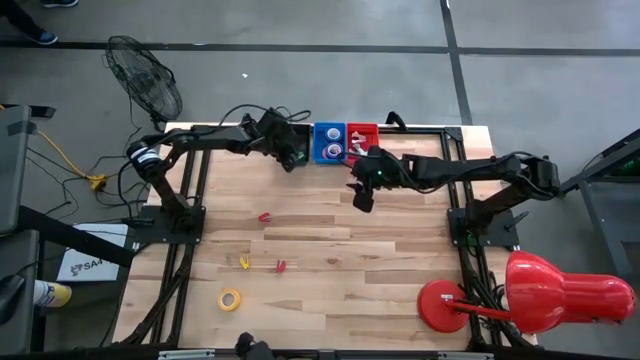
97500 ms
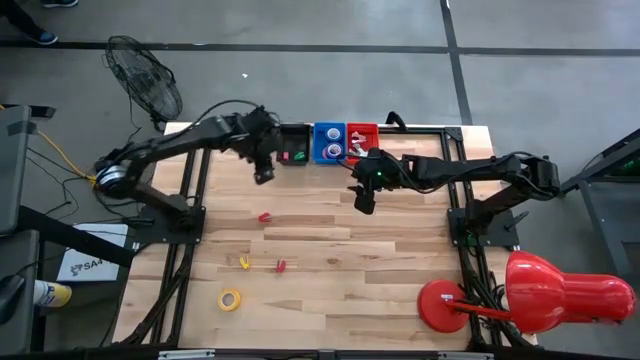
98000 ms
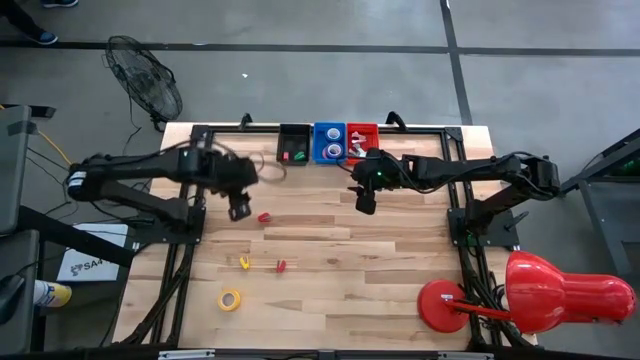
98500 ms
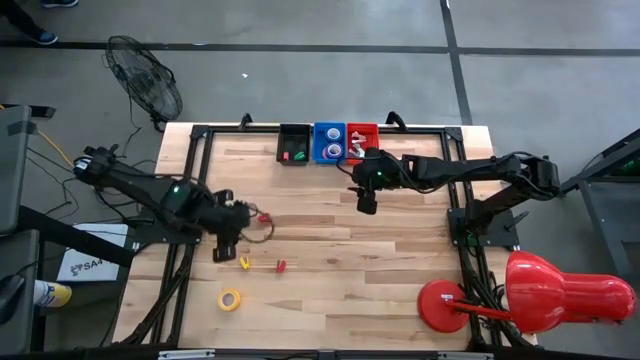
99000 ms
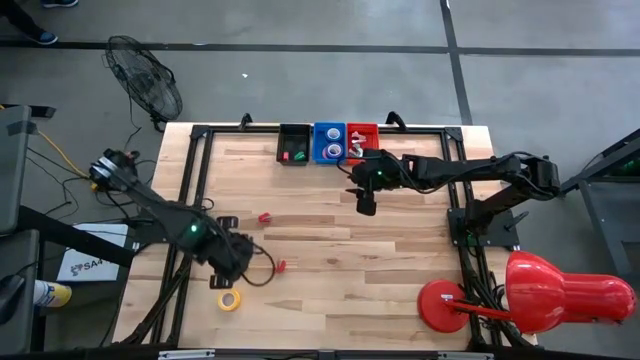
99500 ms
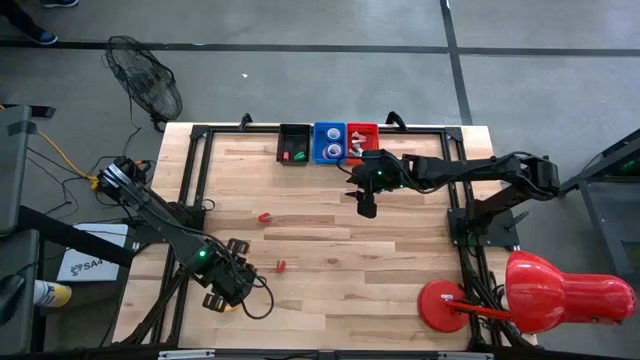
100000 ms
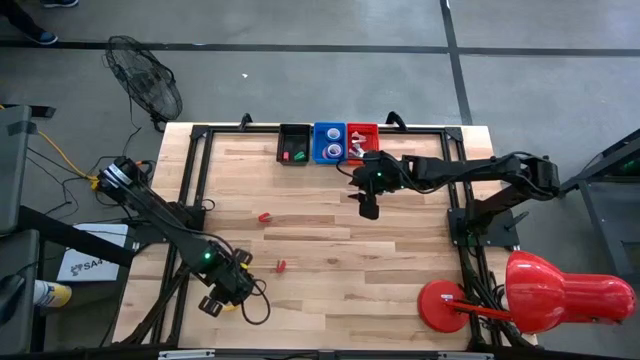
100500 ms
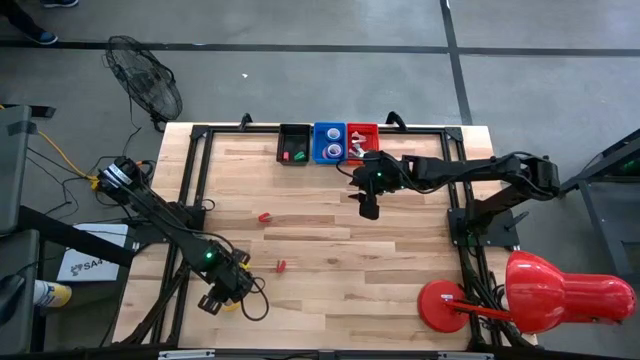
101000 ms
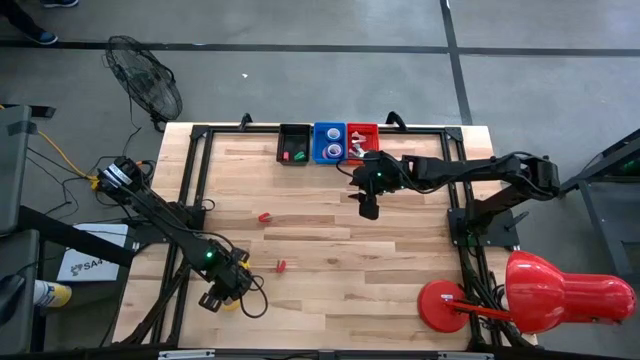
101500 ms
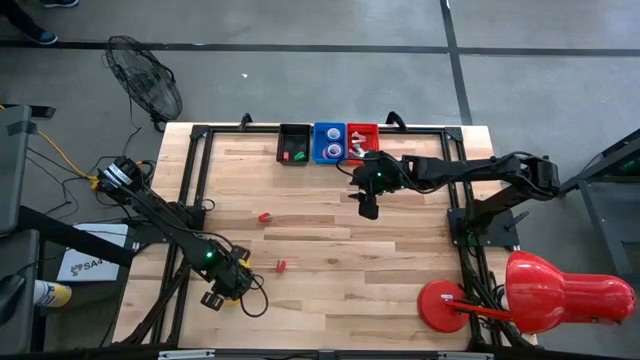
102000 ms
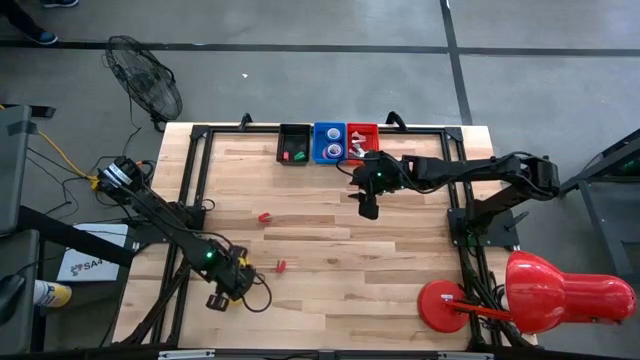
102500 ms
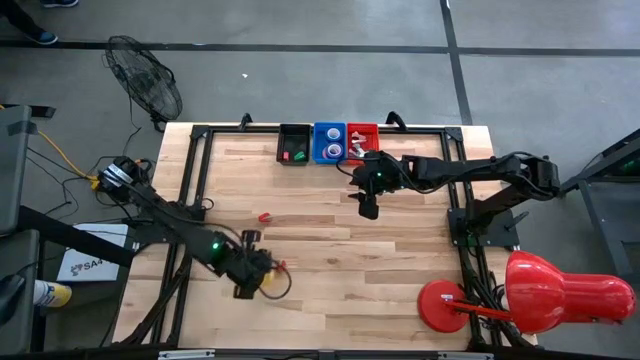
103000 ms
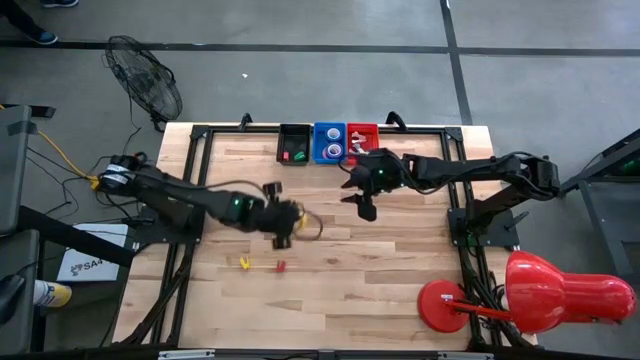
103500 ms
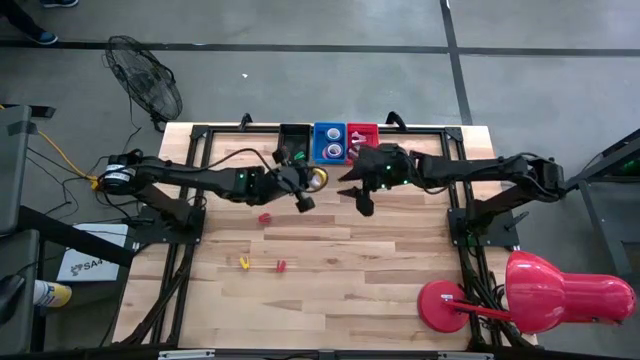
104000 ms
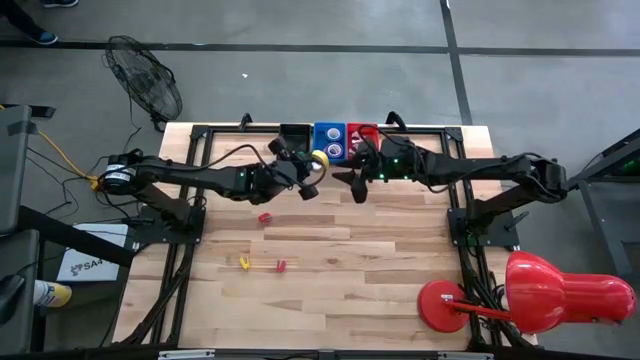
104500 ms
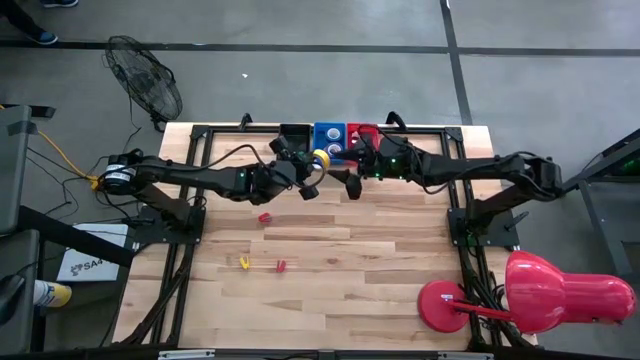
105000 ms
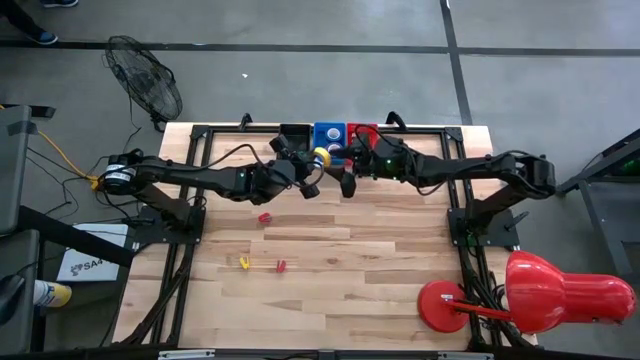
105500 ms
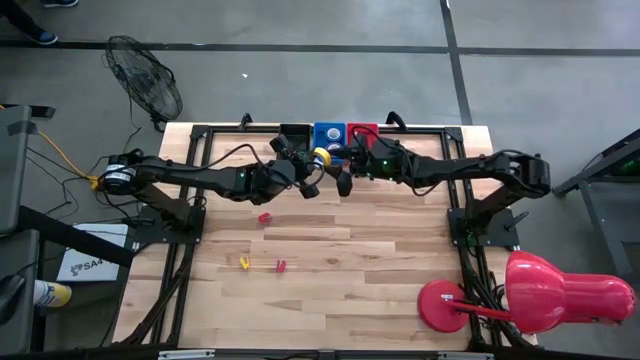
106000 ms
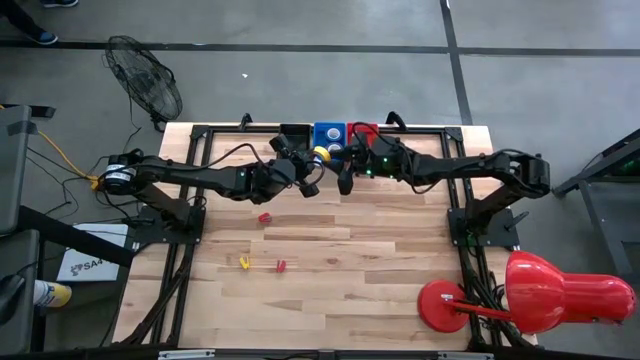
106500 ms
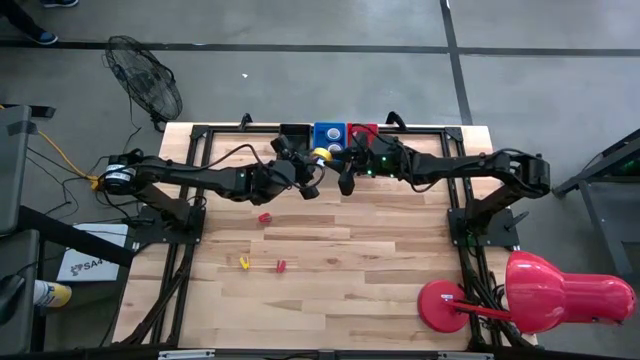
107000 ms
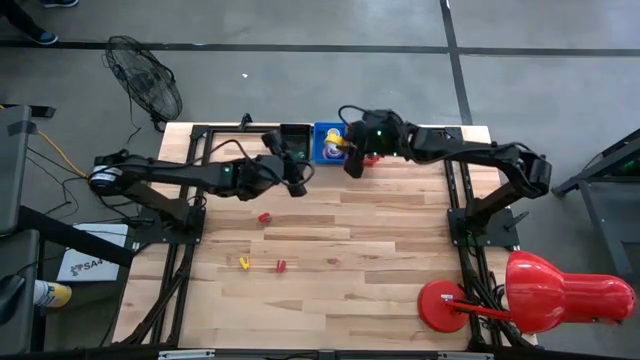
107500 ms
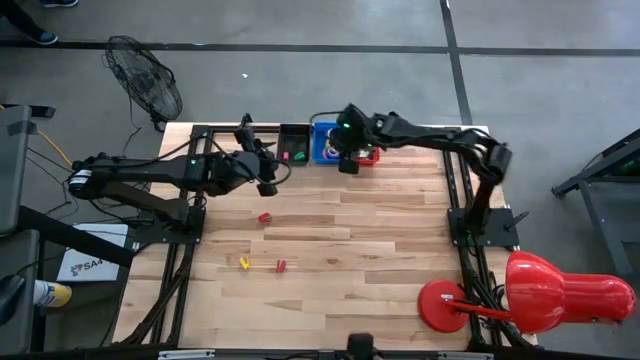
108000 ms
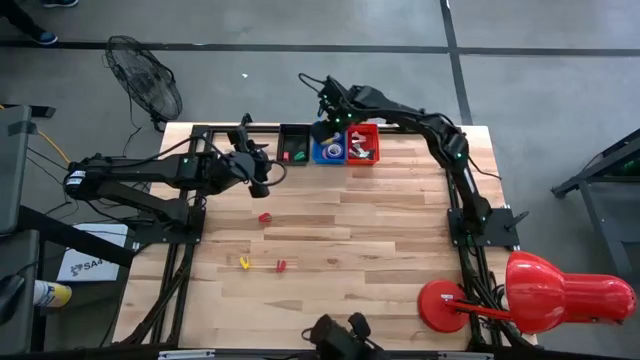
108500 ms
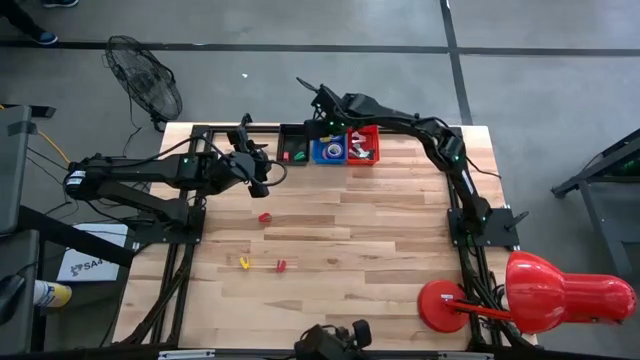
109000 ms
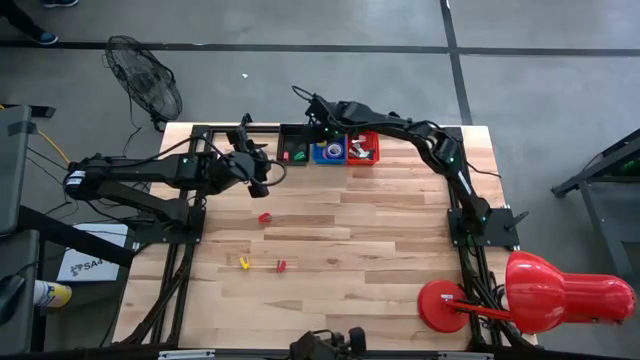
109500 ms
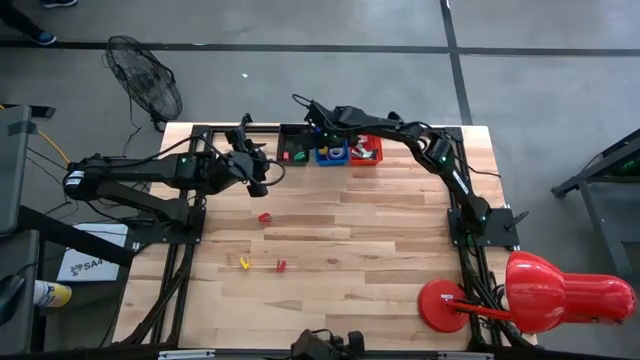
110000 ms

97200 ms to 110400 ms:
Task: Pick and place Stapler, Stapler remover, tape
Put the yellow tape into the blue bin

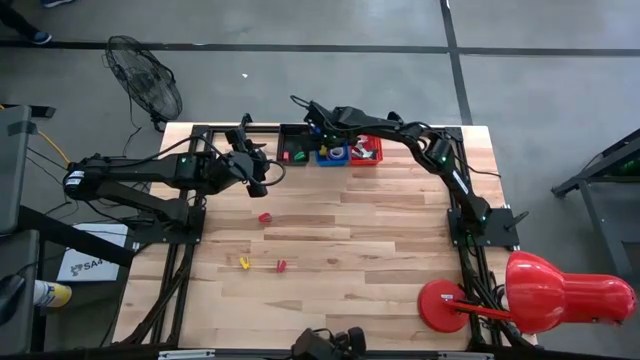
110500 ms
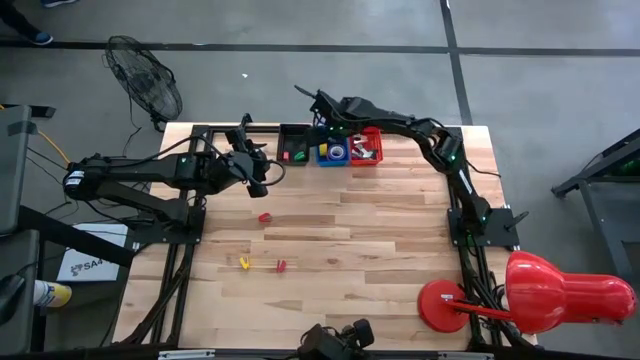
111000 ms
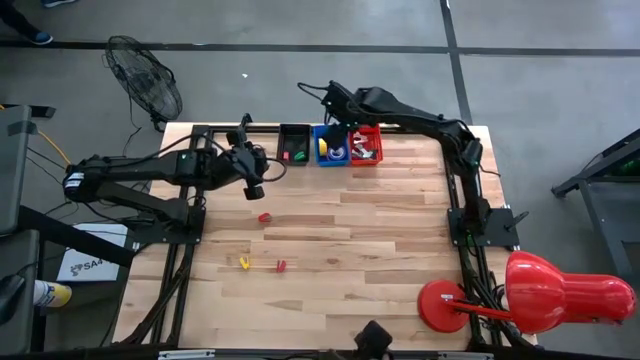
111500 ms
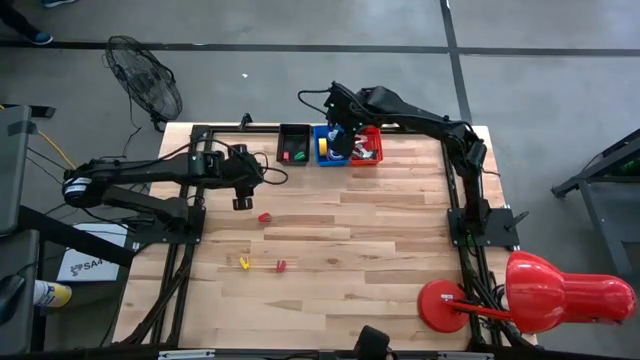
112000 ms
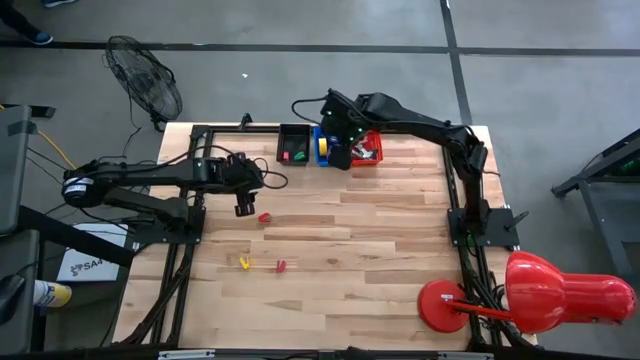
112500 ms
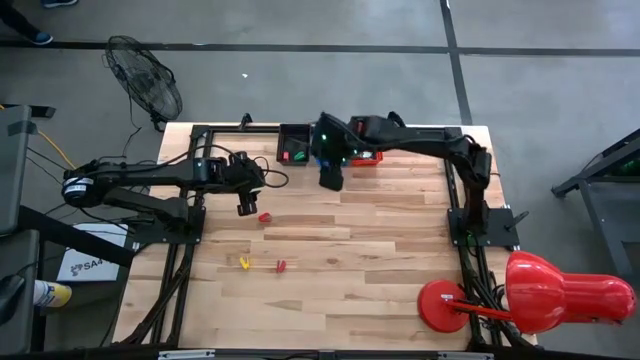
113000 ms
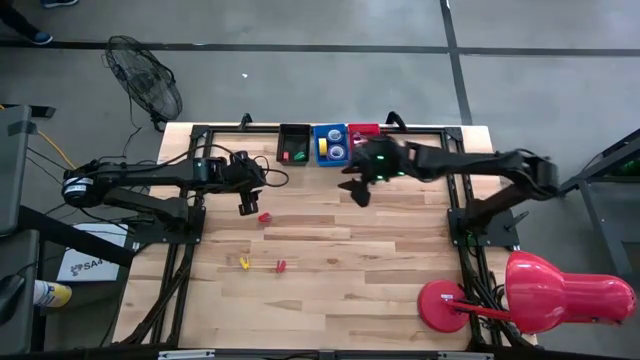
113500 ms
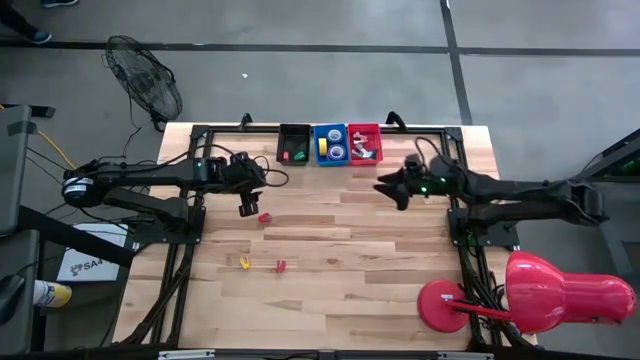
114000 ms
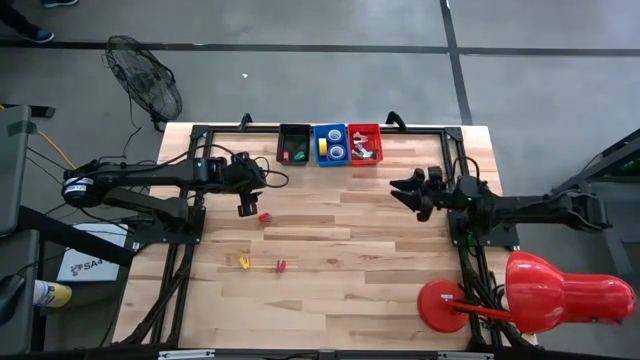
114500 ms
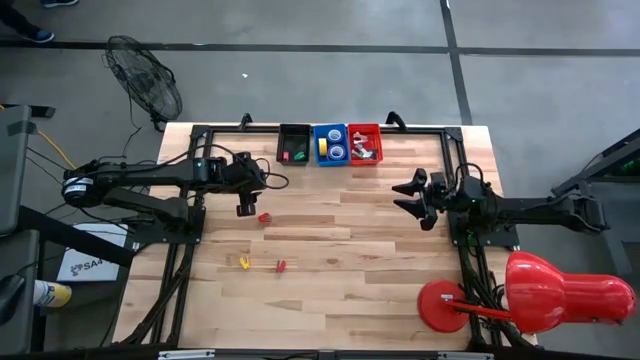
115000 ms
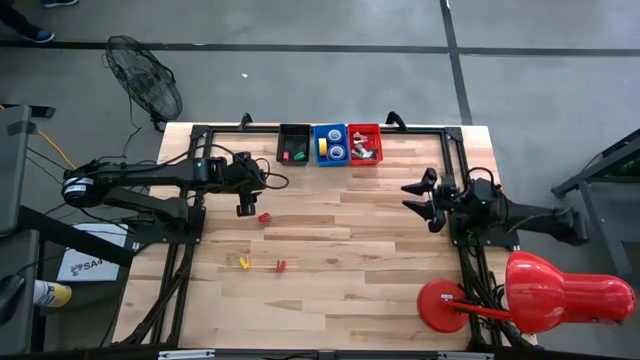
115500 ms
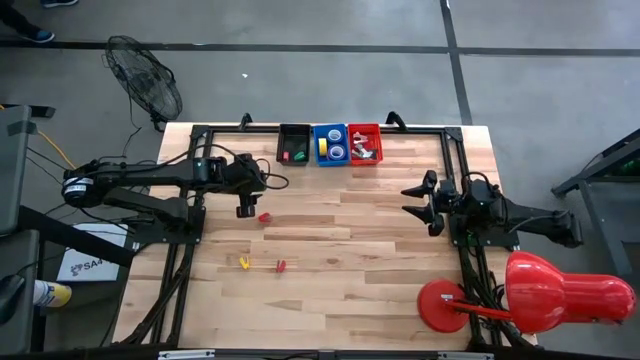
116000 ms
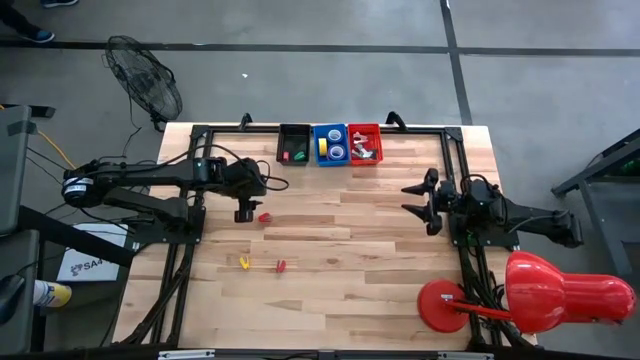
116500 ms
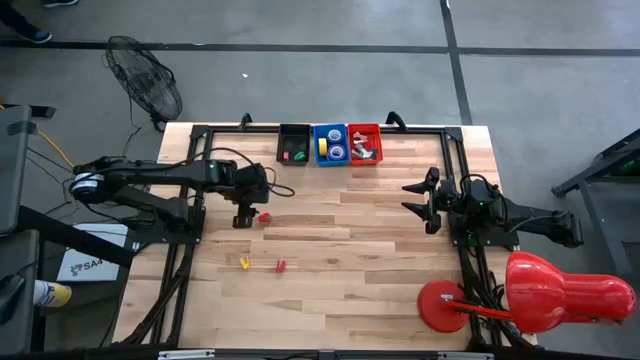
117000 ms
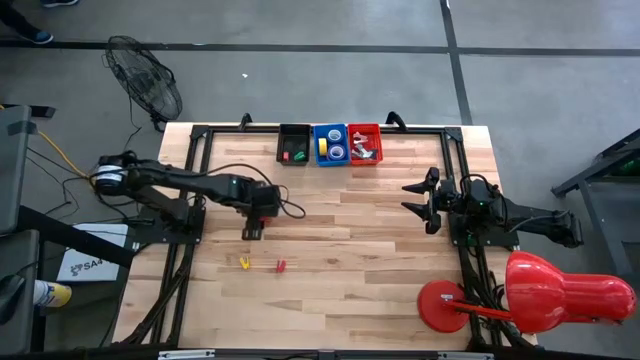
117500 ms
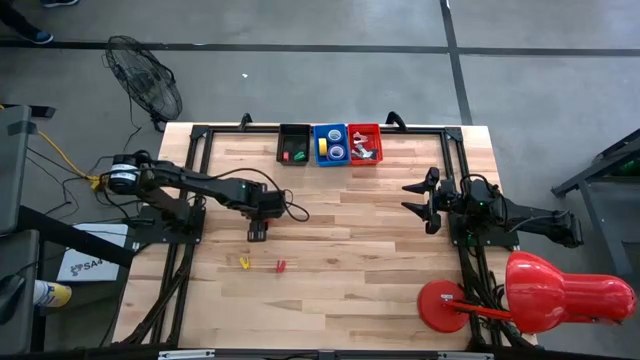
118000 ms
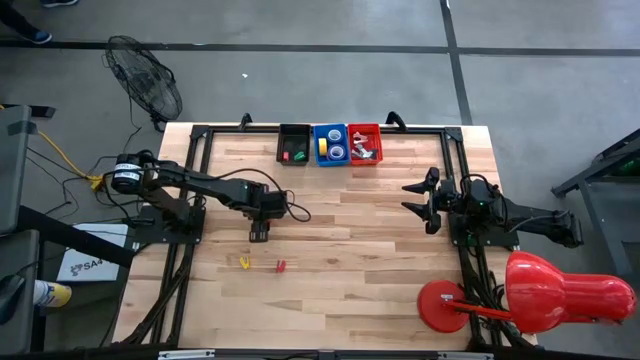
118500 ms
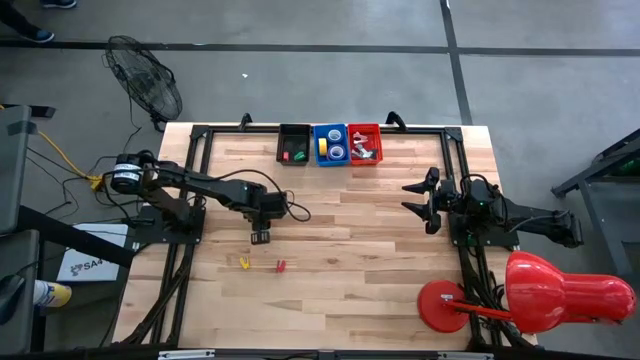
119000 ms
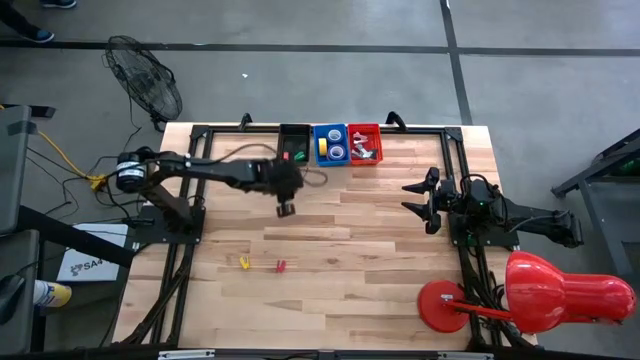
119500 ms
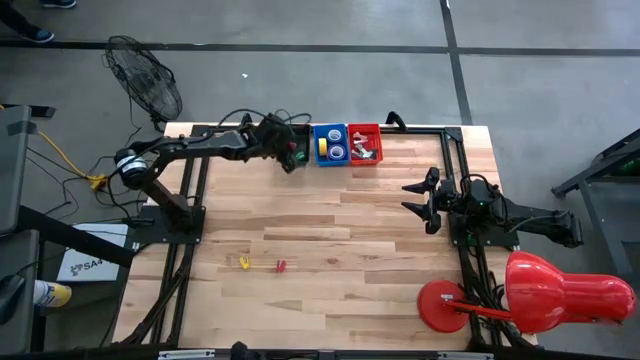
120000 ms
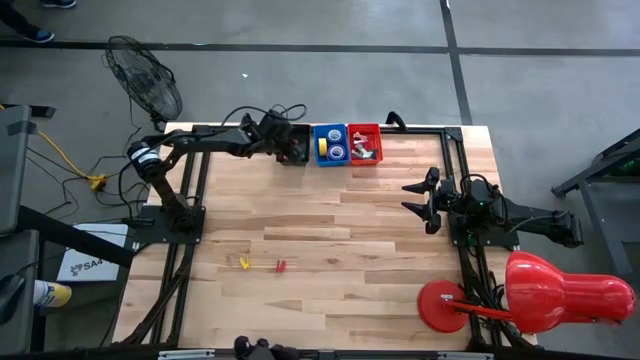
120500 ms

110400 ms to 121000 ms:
Put the top red stapler into the black bin
